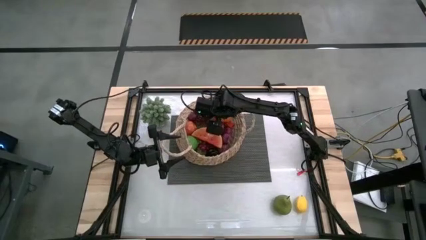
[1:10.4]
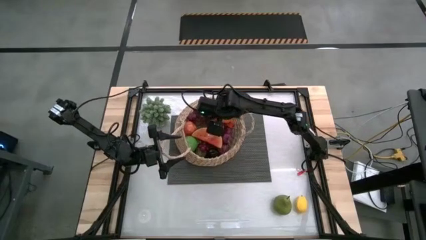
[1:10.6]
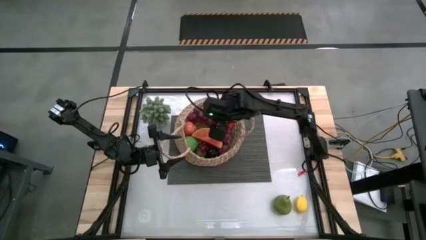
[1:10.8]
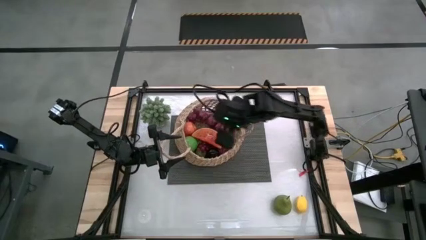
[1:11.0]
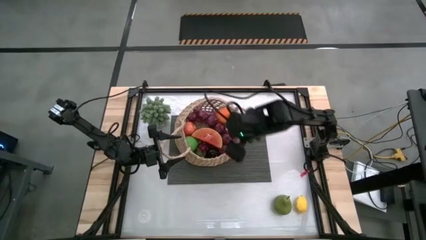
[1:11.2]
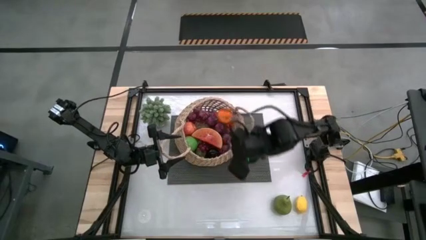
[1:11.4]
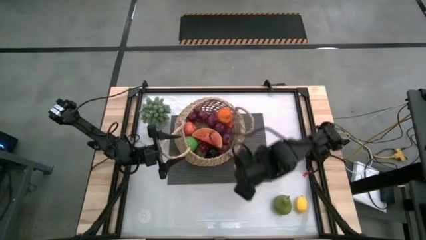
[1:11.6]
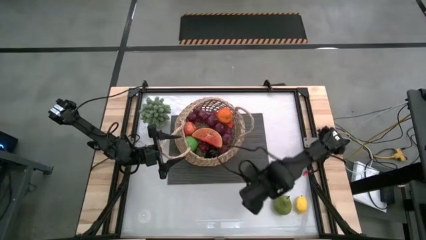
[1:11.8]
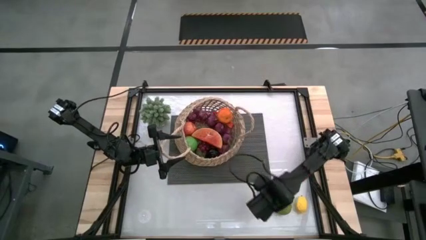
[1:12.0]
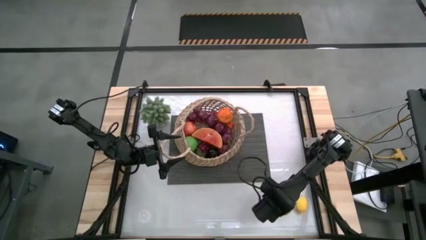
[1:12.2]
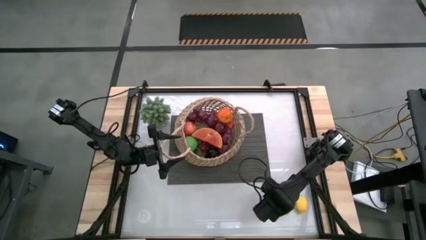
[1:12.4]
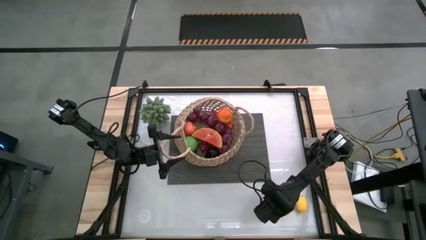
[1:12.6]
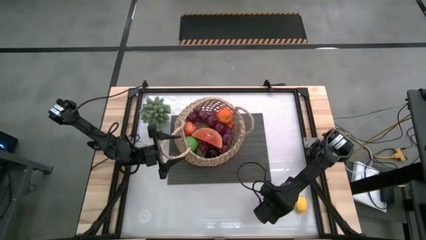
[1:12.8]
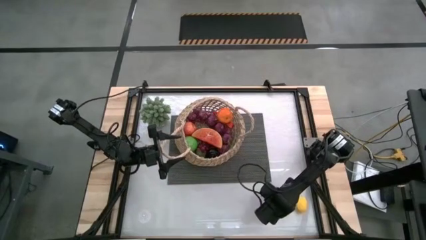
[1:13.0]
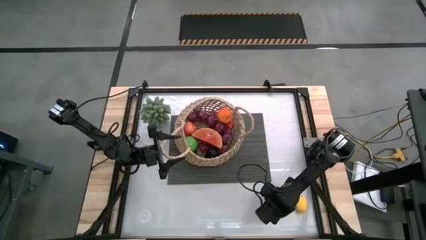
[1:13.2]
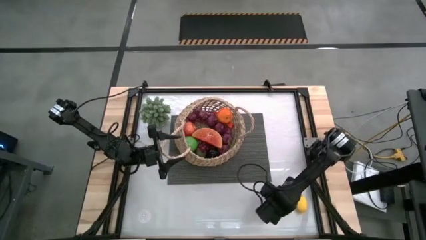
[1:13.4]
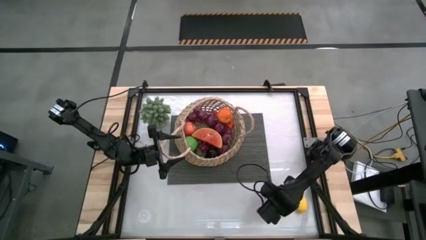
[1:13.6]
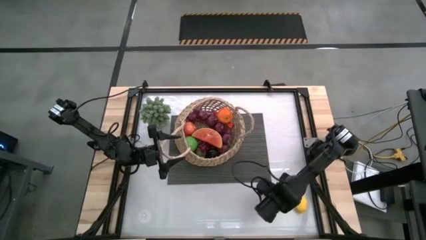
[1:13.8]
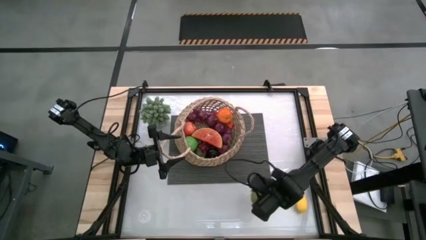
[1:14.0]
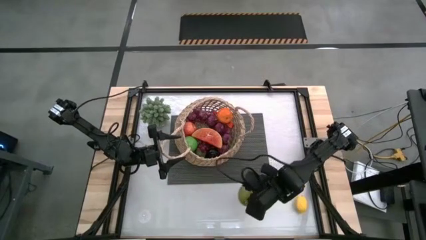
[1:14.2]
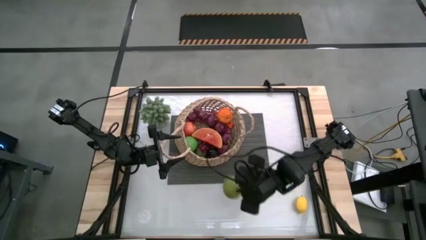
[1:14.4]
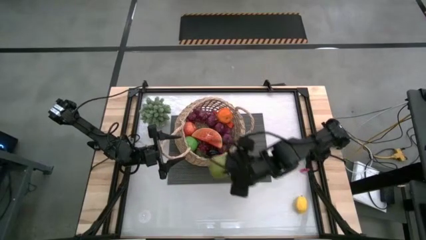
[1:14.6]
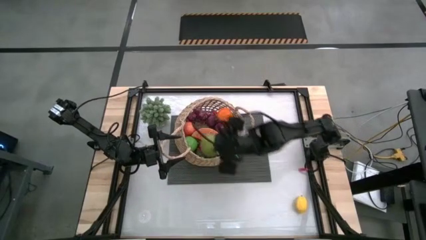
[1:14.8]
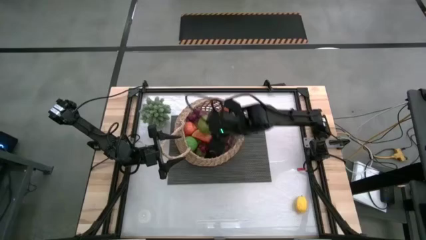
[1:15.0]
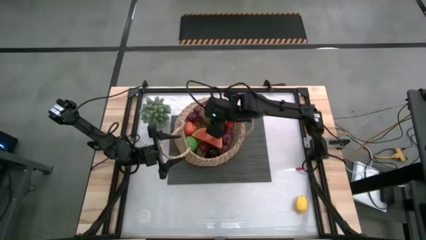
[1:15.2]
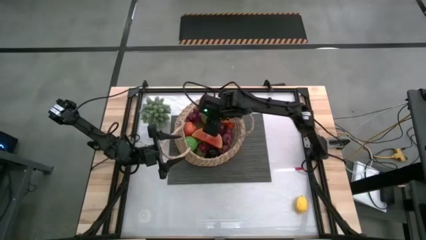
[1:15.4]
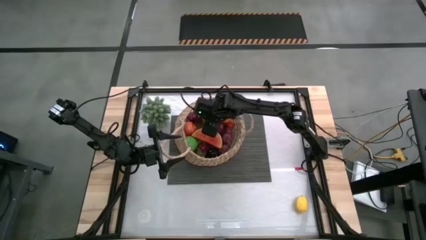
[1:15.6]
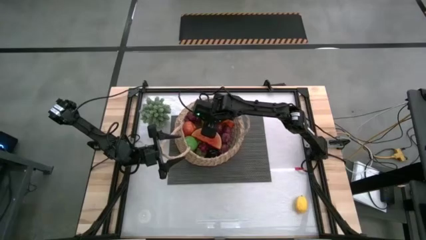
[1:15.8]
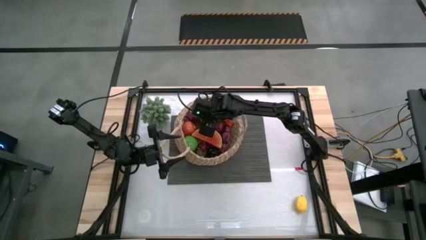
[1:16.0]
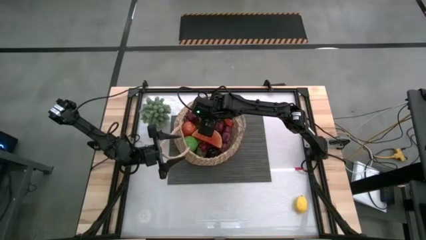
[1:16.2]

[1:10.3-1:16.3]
Task: Build produce basket
Put the green pear into the brown basket

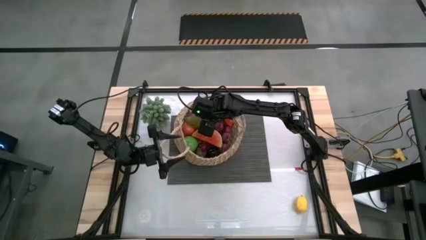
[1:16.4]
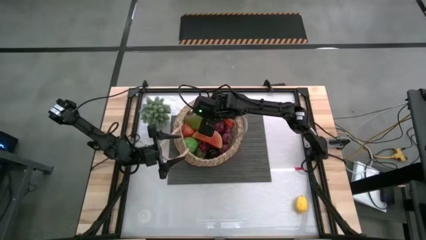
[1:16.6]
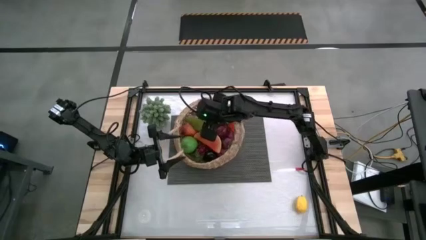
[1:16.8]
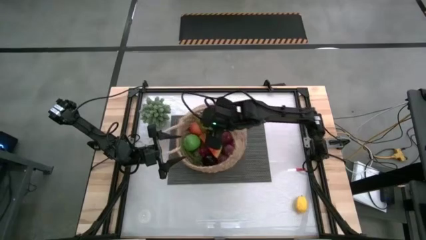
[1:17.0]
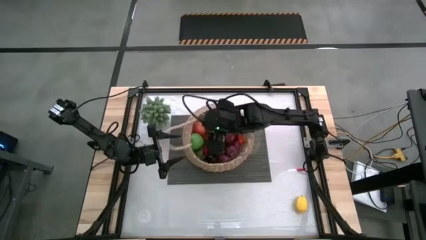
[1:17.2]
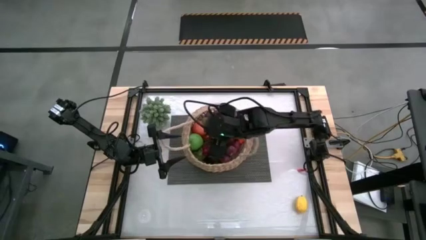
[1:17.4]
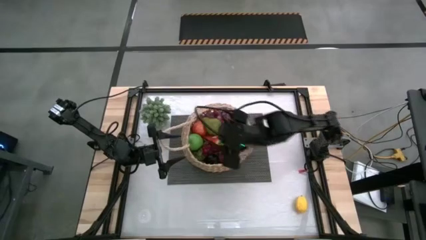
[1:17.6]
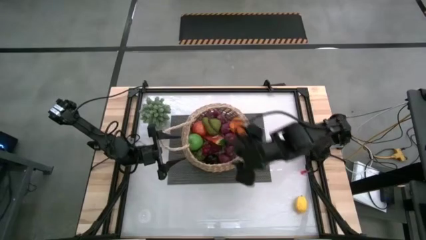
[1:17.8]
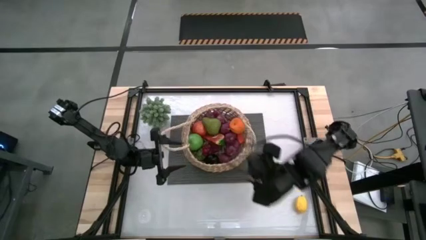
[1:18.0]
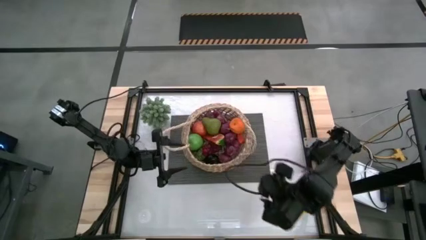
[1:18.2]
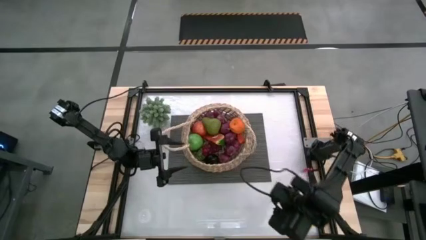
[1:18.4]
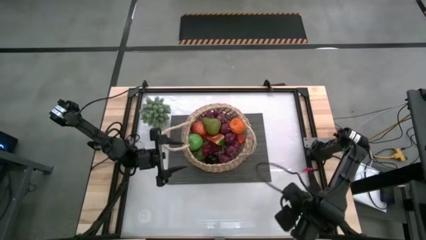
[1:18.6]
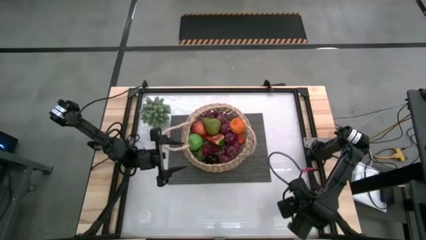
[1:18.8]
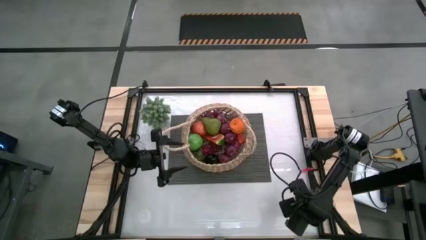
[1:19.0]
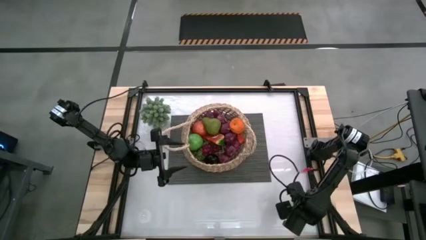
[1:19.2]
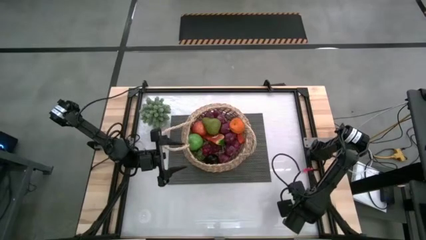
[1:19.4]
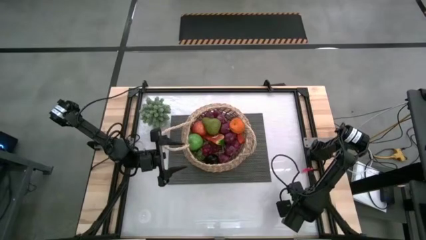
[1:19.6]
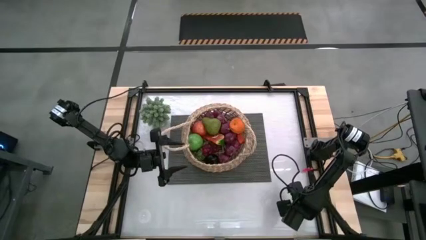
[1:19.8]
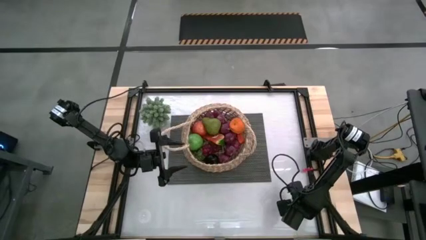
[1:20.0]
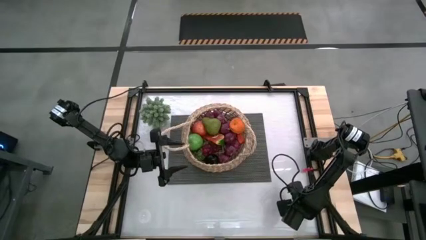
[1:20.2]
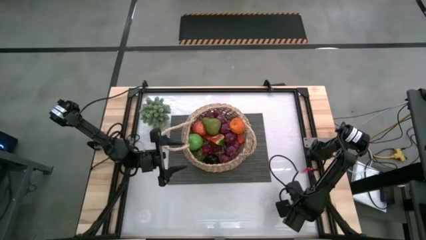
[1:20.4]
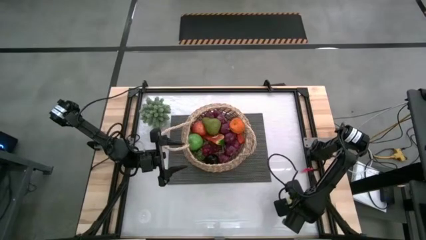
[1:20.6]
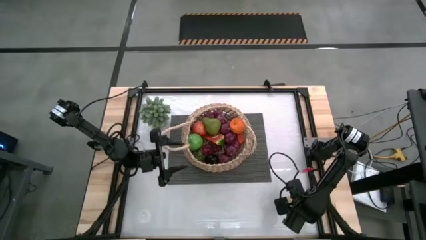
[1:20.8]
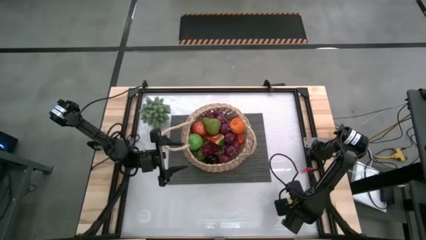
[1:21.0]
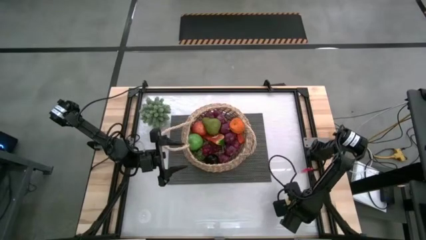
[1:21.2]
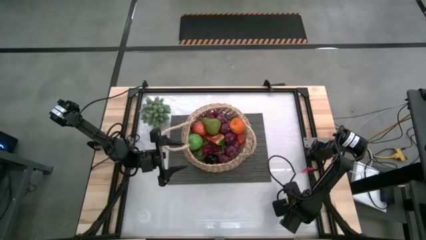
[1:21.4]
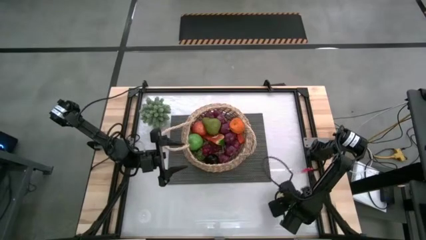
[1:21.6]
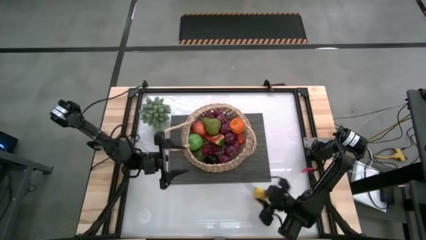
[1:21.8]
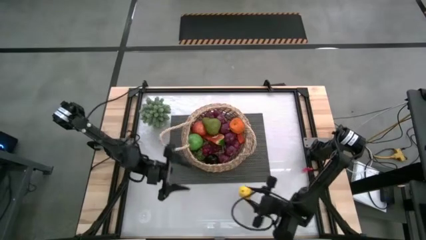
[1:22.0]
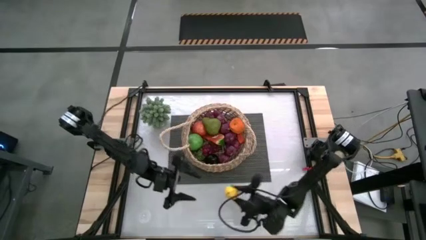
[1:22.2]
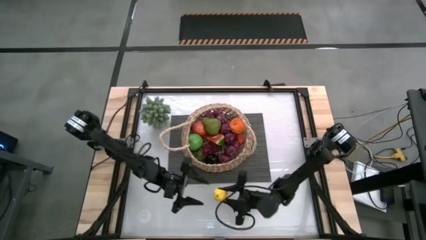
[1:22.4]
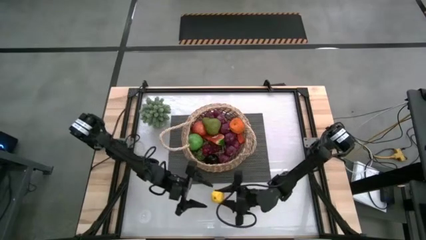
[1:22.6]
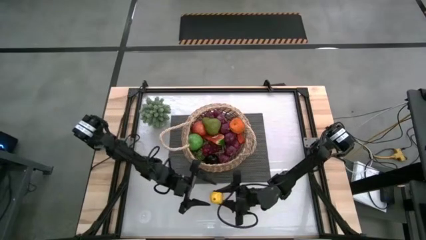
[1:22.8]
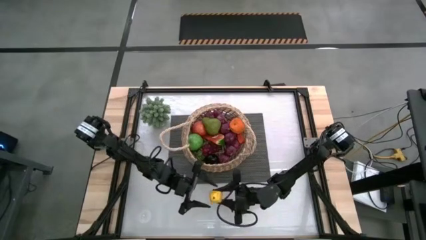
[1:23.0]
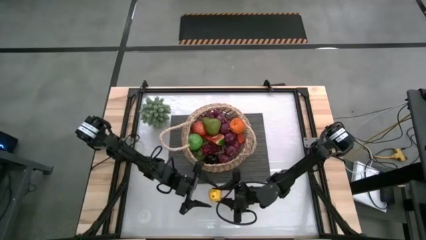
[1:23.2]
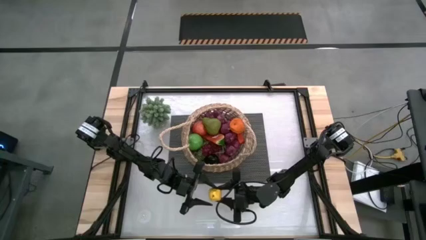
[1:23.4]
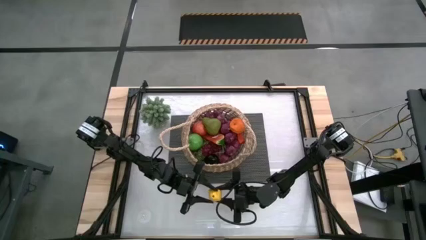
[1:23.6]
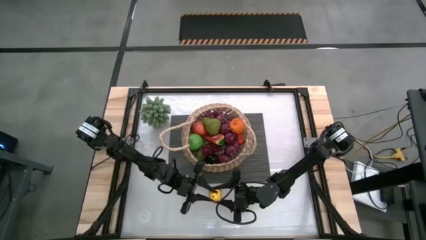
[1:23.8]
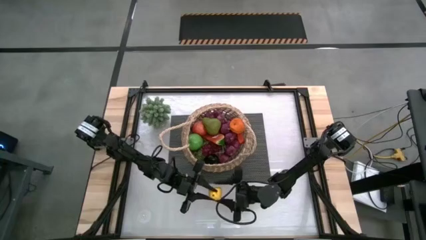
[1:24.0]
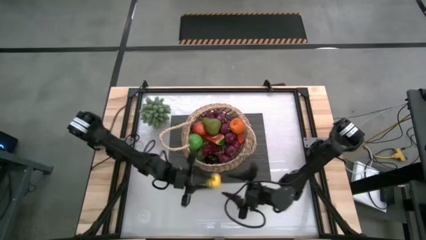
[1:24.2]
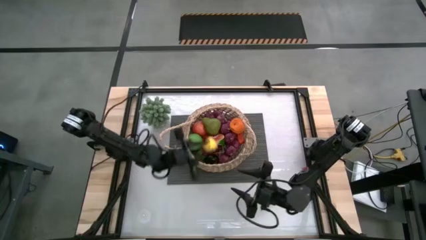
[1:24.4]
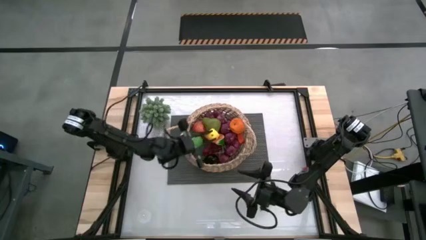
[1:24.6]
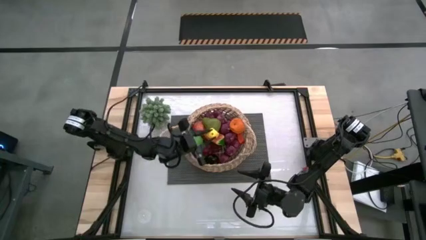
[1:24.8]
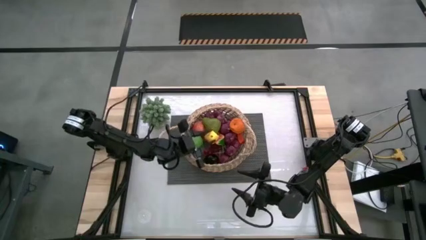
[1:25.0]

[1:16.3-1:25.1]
Put the yellow lemon into the brown basket

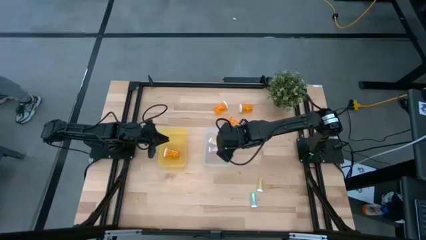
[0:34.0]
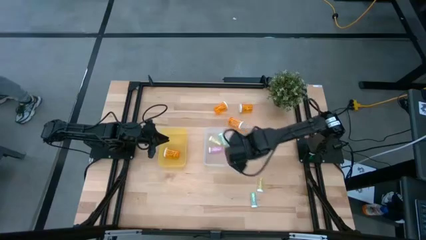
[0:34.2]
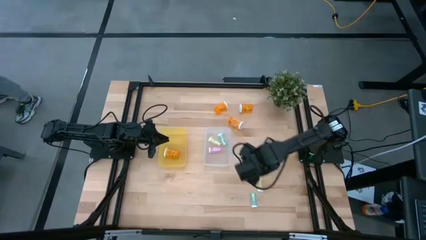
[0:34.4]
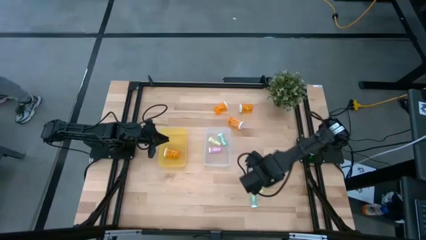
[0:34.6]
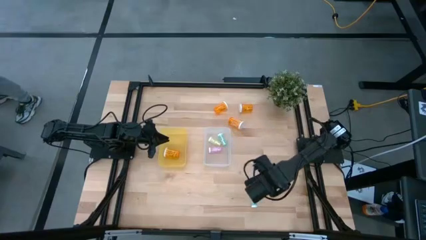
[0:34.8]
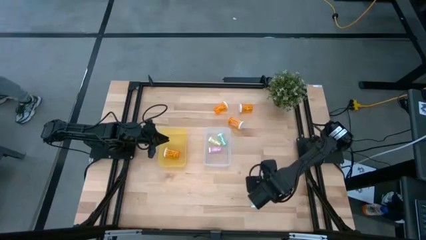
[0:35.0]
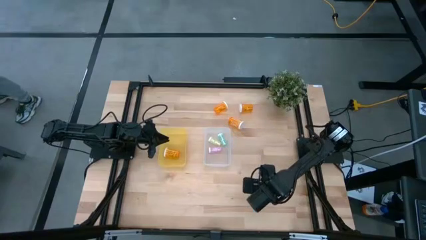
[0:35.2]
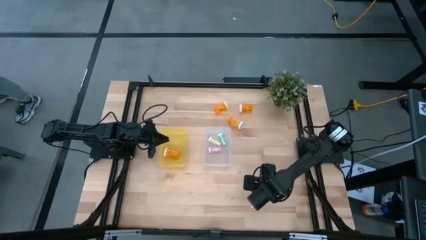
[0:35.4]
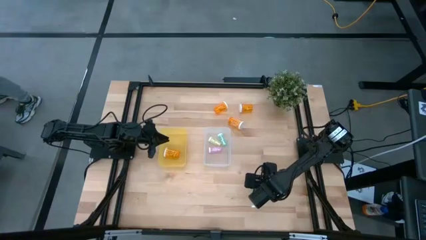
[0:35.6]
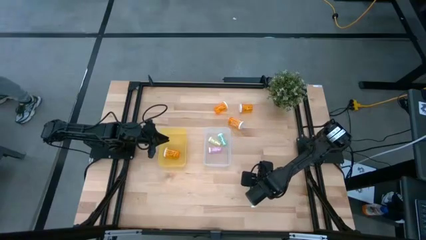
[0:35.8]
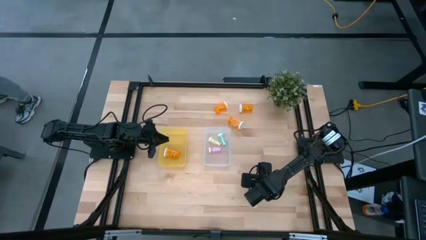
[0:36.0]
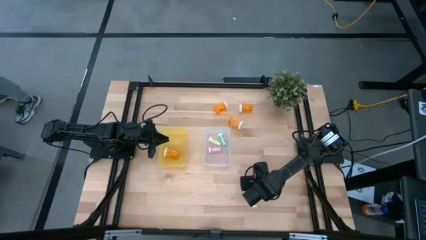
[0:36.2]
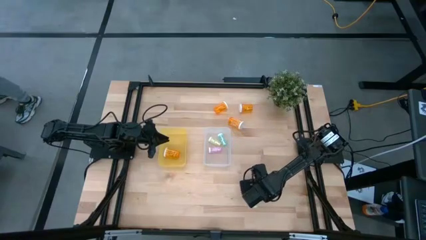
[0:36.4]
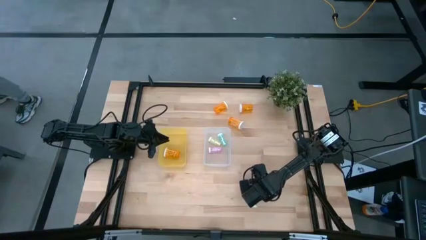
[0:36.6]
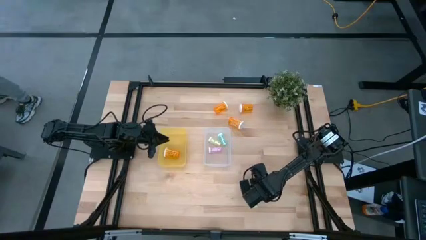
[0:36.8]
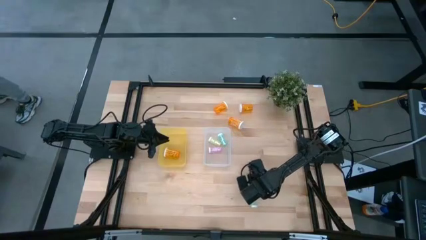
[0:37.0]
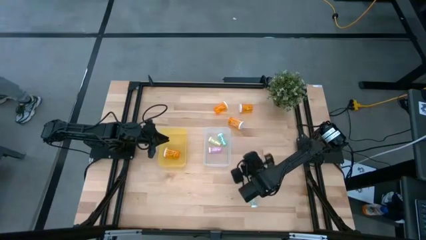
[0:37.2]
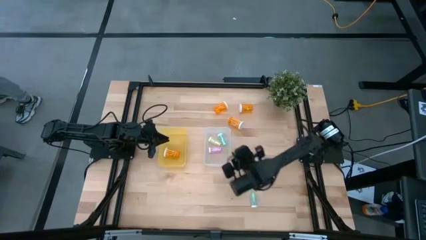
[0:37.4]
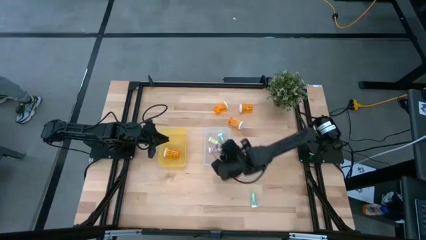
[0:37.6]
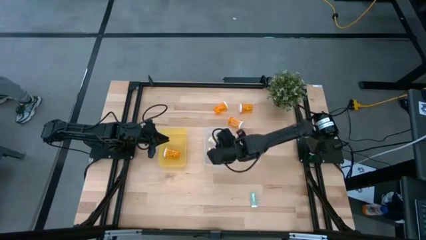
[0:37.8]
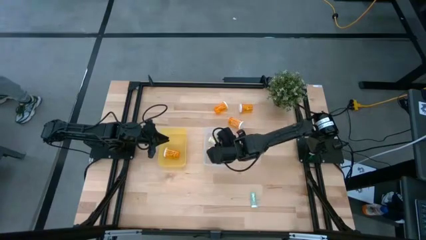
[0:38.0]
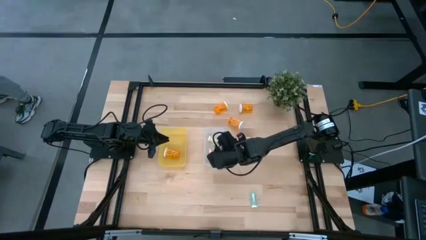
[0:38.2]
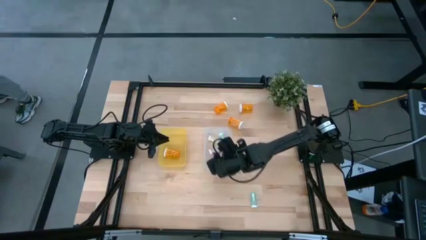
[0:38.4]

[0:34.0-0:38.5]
Task: Pick and place medicine bottles into bin by pill shape (circle, oval)
Put the yellow pill bottle into the transparent bin
